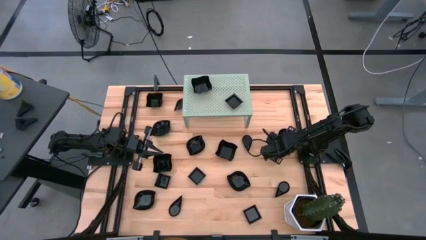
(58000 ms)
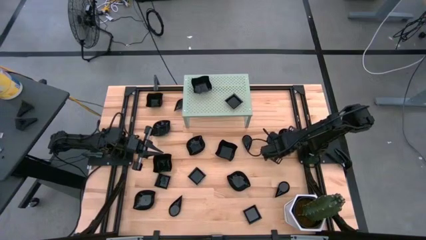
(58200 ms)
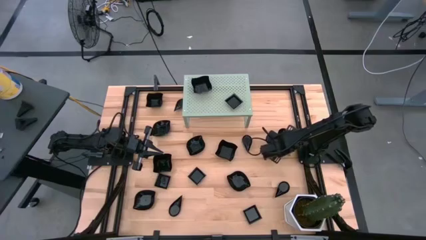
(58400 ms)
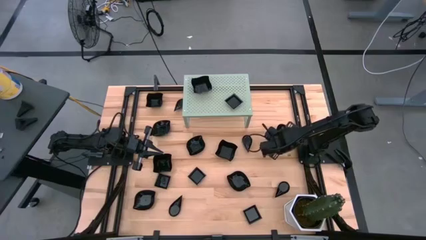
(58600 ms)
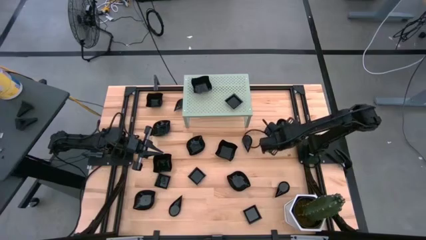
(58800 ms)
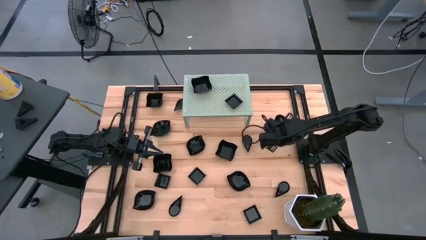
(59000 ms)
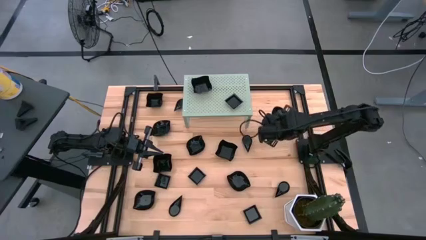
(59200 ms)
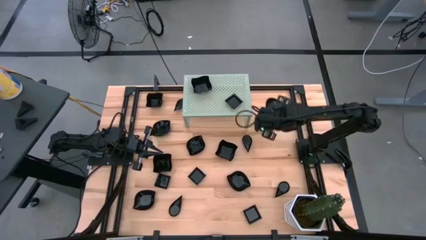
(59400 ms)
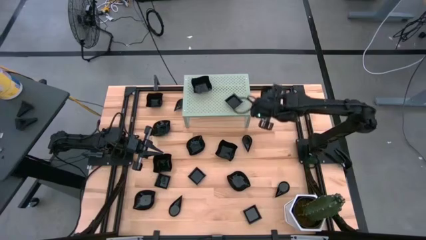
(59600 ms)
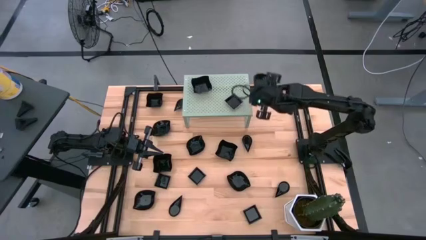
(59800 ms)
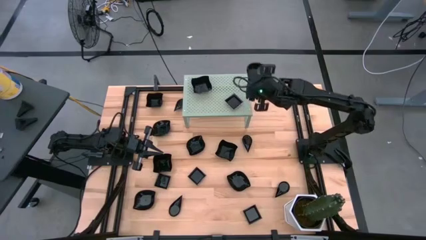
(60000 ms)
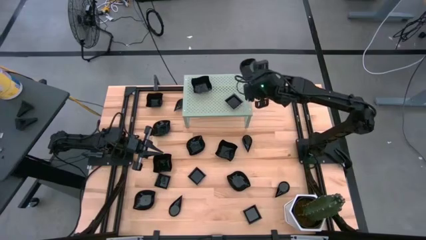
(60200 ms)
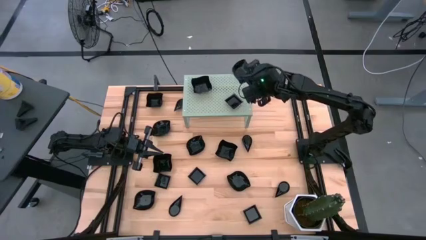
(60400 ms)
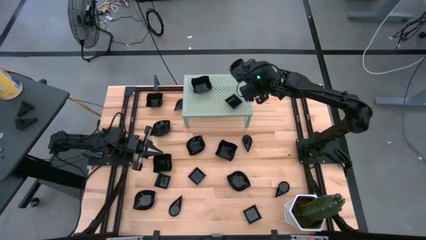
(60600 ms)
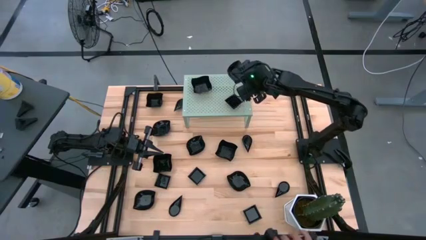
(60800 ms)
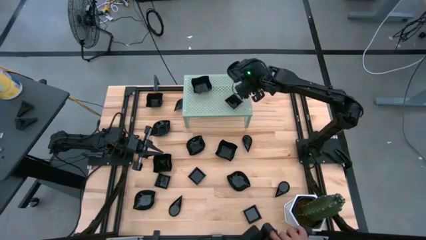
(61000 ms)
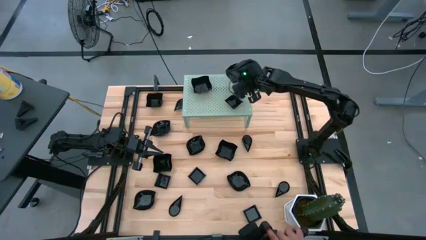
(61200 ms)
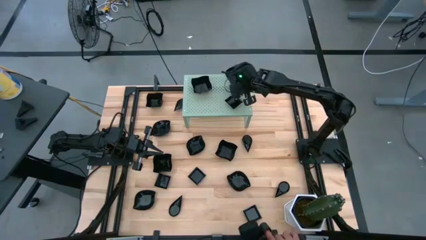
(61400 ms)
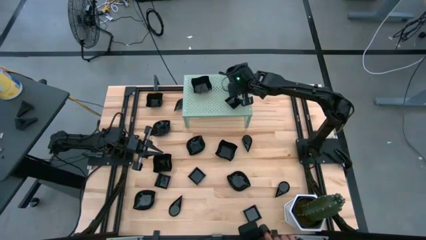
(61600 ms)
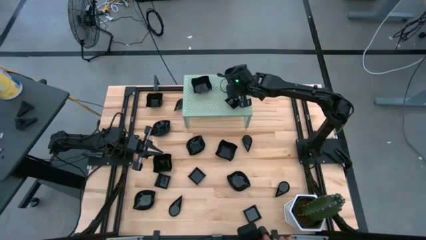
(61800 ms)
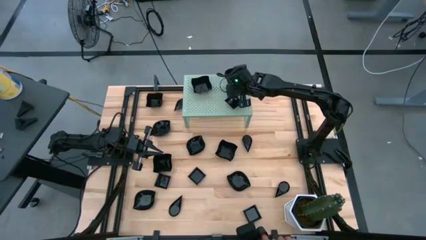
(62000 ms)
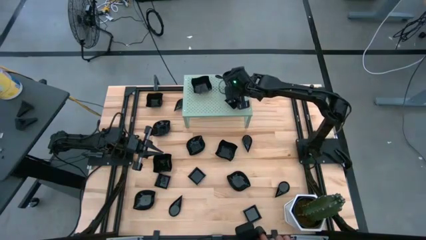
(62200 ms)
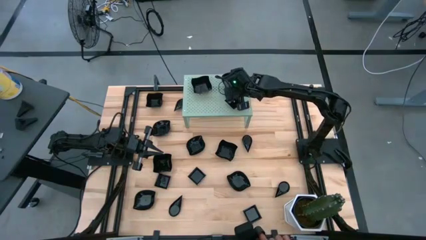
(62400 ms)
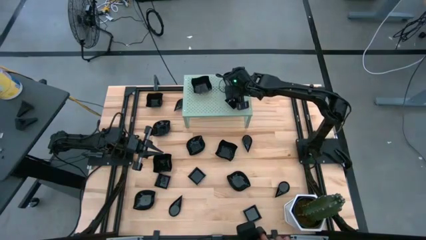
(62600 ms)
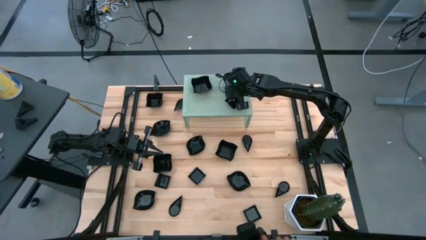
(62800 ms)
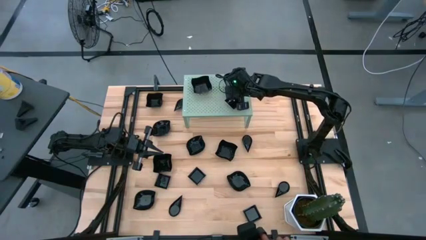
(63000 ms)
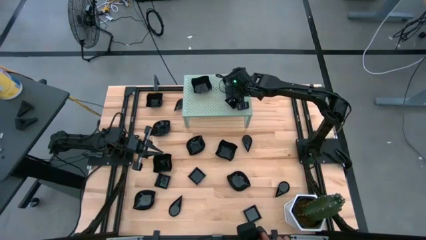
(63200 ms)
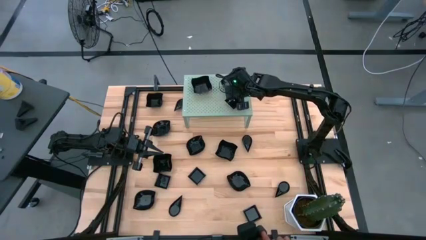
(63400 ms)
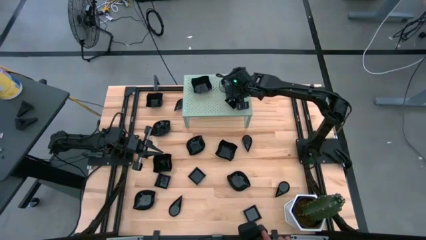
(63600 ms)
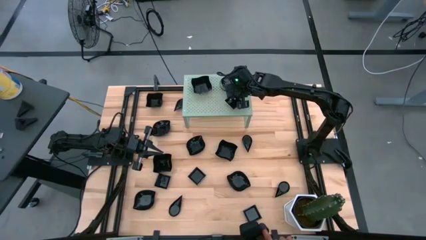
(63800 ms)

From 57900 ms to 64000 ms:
Task: Pick & Place Mini shaped plates
Put the leaf shaped plate on the shelf

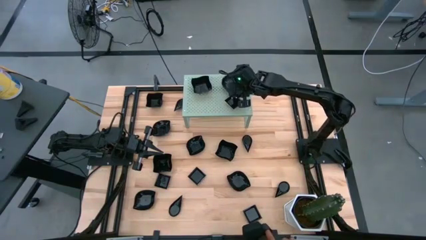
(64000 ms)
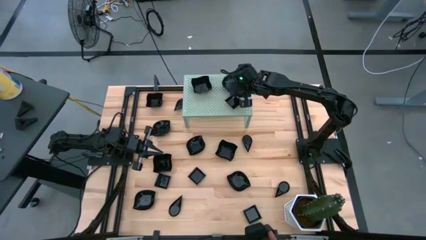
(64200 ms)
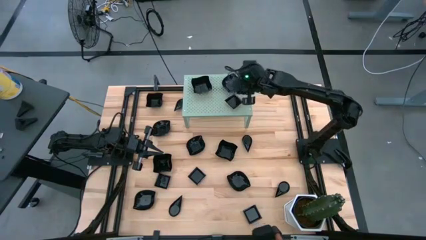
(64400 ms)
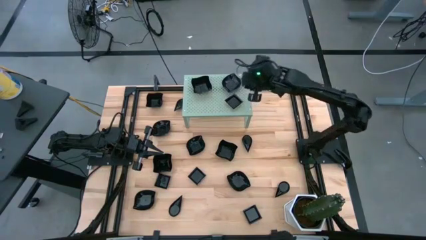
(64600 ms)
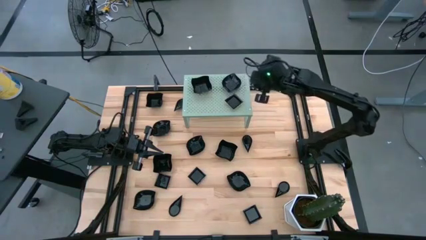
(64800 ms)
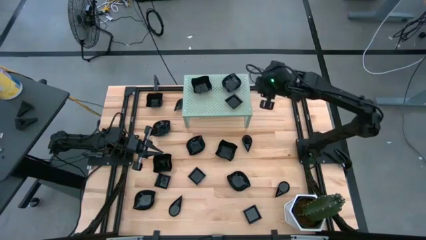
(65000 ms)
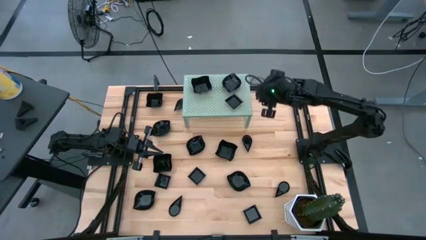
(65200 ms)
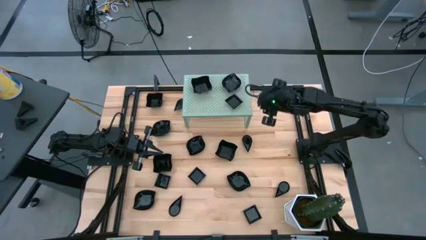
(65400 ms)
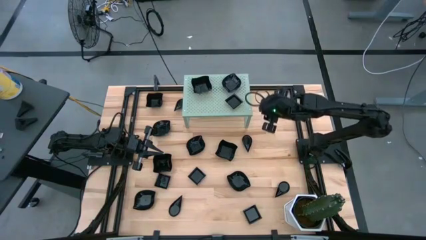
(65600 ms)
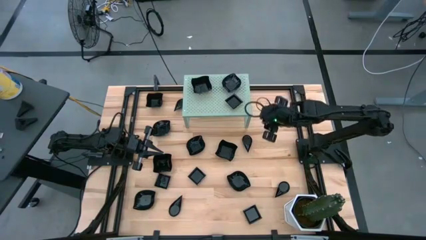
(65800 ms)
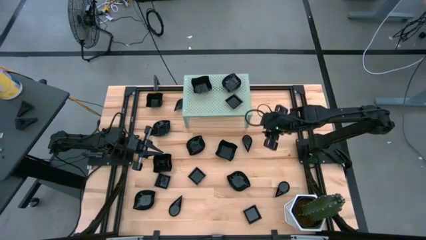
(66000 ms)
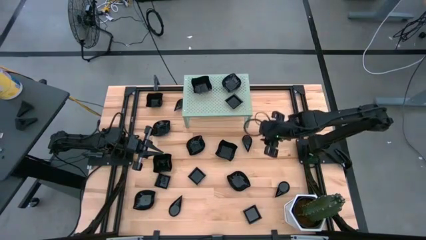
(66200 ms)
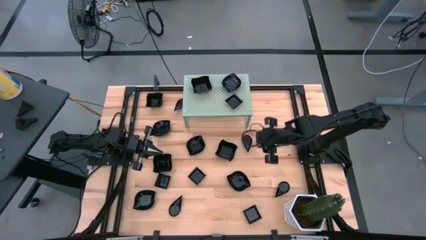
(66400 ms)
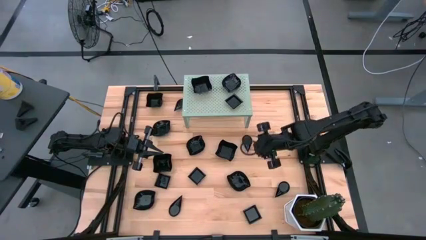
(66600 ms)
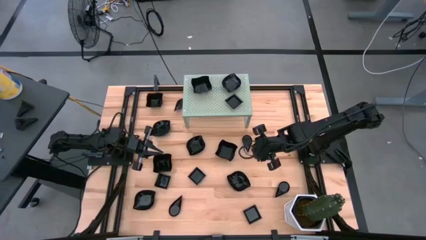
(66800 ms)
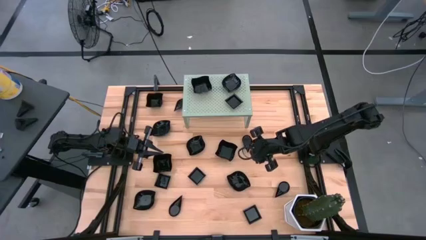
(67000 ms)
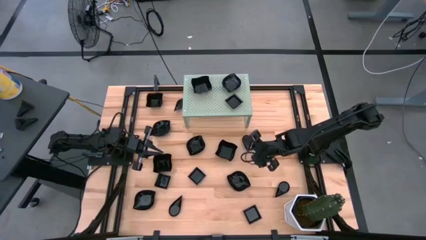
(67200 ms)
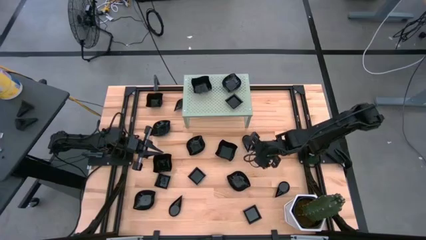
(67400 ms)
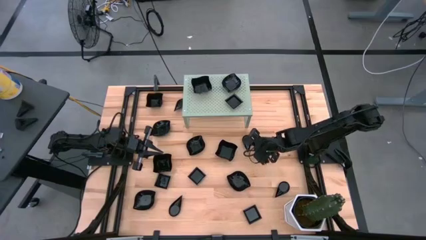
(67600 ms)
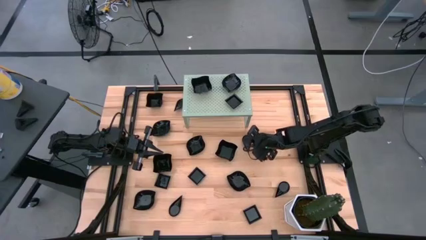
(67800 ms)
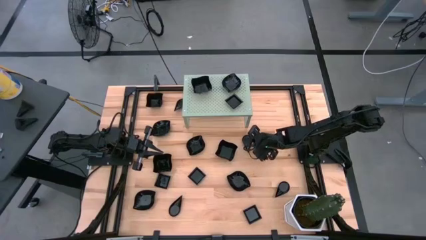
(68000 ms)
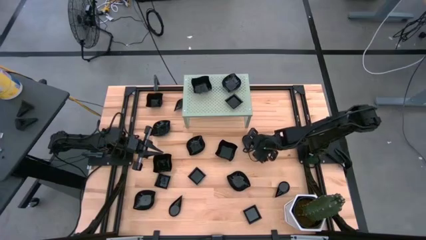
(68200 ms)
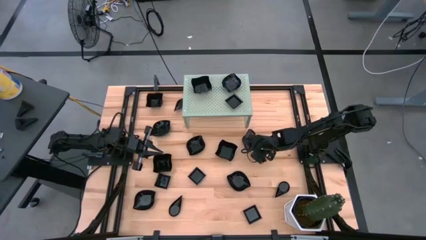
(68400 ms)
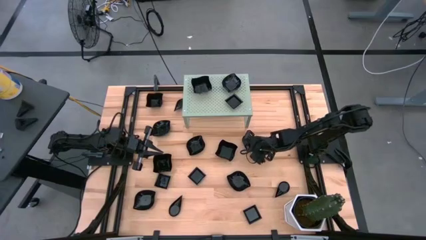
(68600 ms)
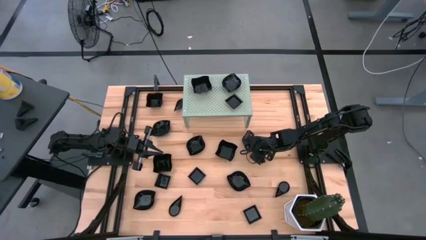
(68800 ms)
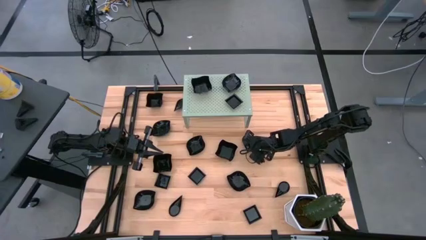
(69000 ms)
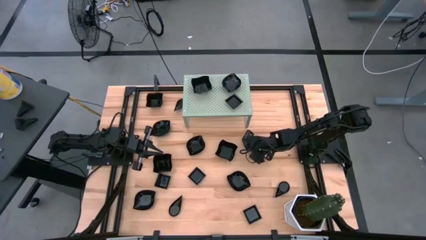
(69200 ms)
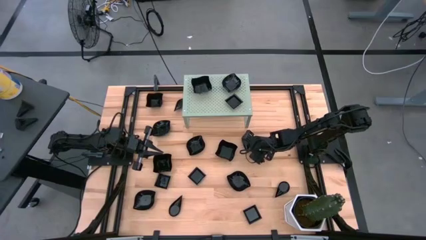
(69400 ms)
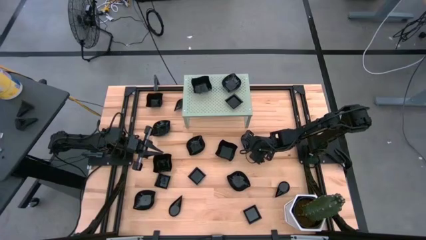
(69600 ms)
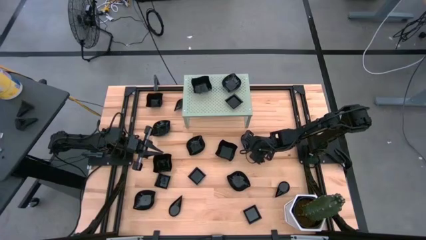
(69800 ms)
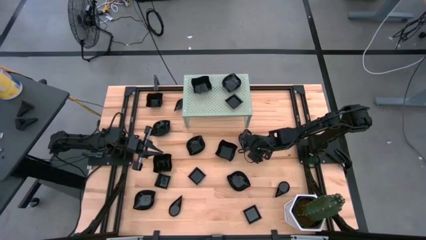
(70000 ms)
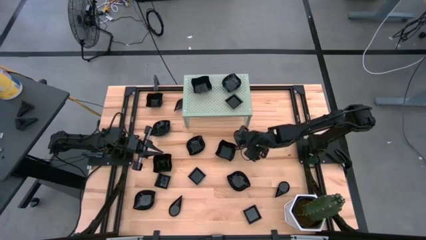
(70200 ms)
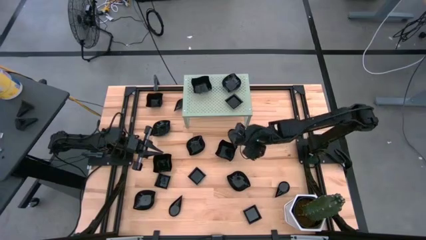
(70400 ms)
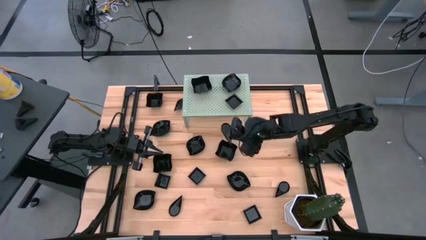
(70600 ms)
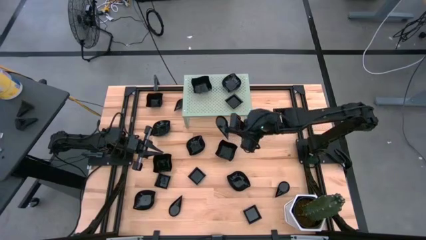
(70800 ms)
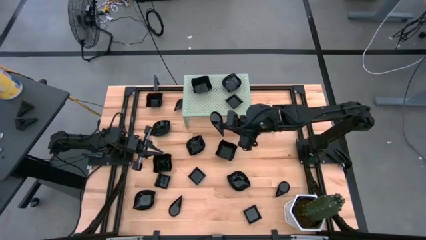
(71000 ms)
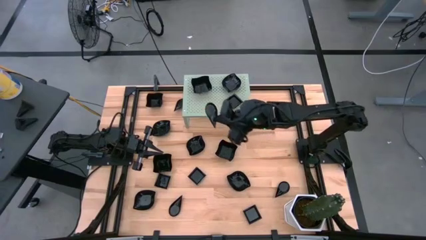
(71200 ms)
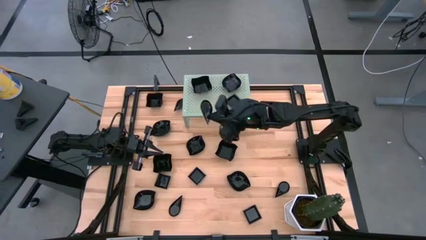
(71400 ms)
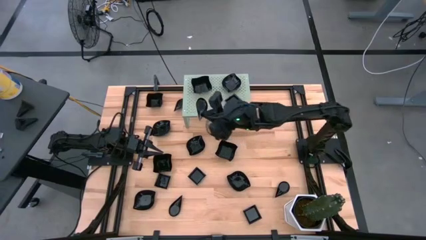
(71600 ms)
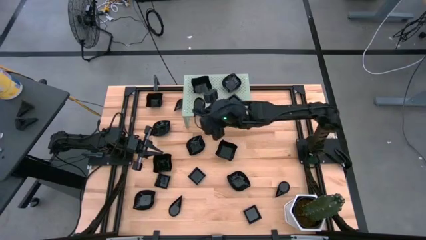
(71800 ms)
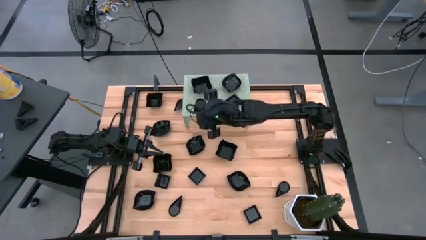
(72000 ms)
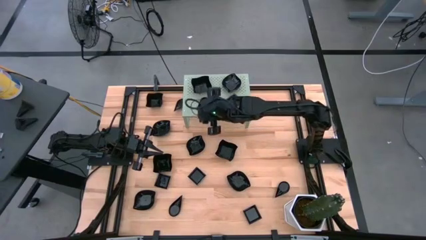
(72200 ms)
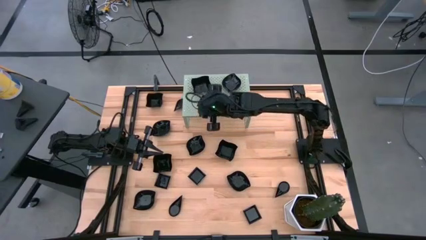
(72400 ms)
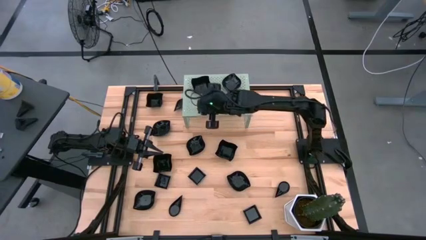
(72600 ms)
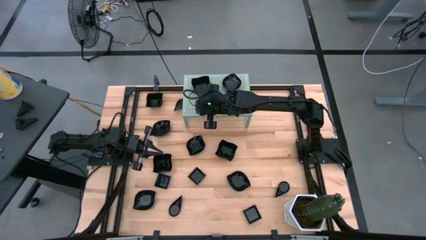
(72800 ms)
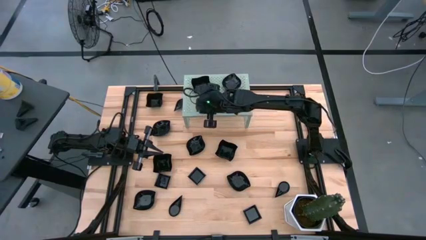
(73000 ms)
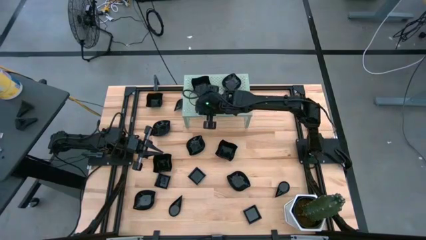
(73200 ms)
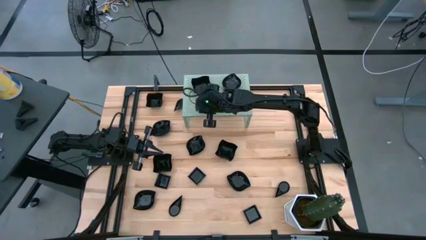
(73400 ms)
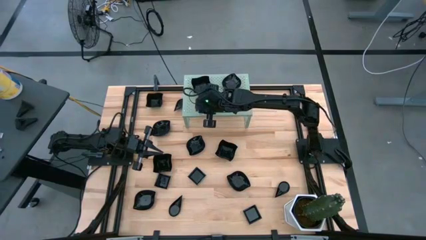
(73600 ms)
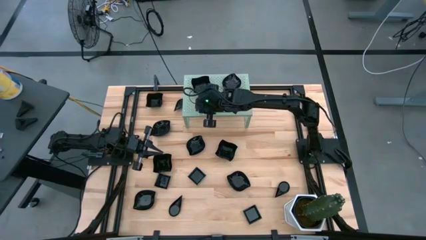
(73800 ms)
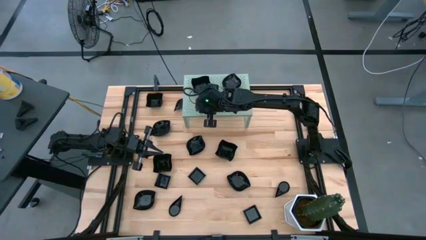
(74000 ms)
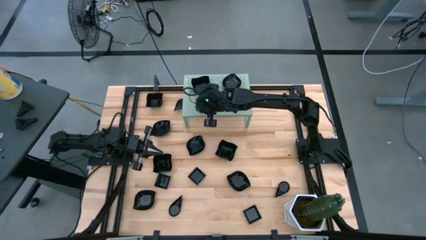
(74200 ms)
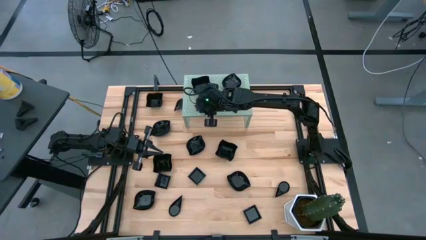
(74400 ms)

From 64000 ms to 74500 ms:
Put the drop shaped plate on the shelf
